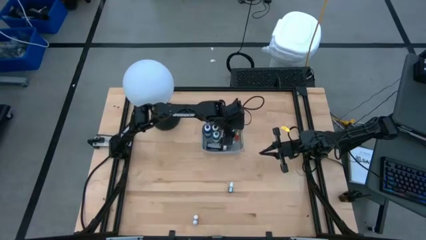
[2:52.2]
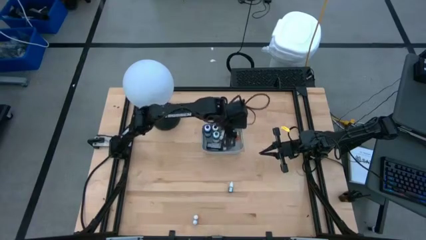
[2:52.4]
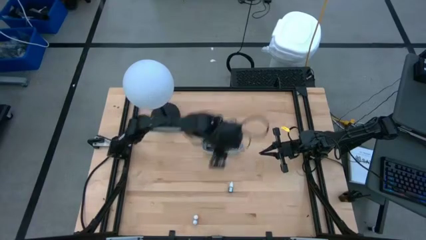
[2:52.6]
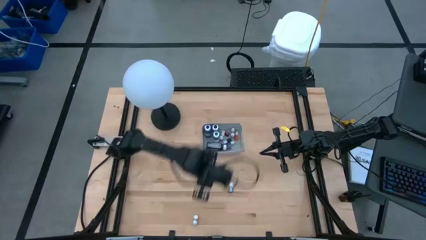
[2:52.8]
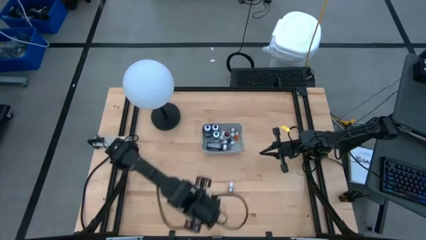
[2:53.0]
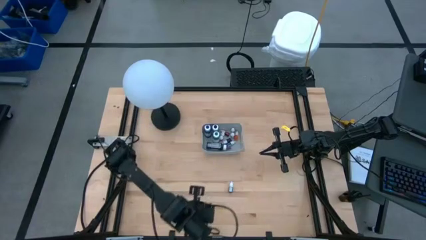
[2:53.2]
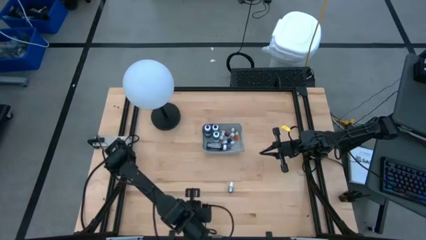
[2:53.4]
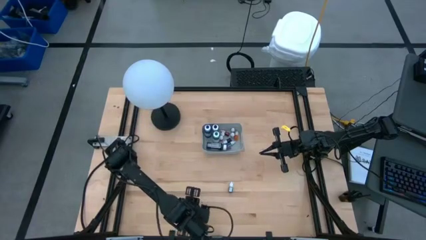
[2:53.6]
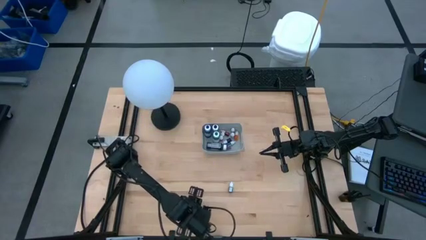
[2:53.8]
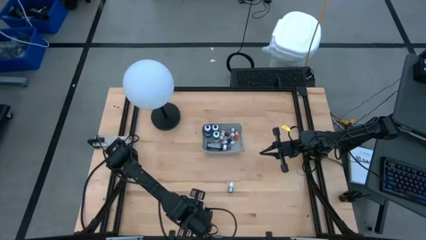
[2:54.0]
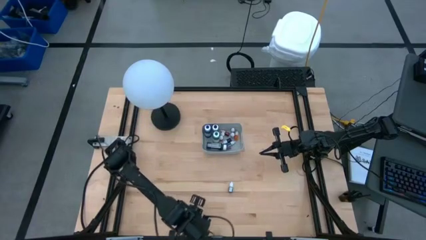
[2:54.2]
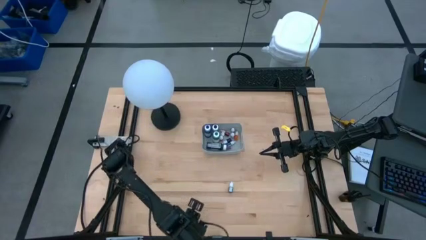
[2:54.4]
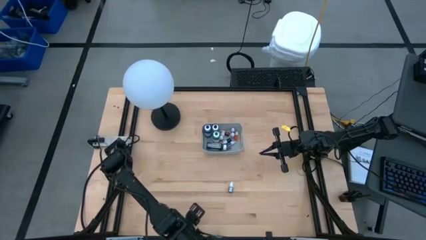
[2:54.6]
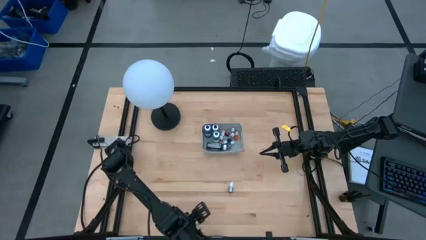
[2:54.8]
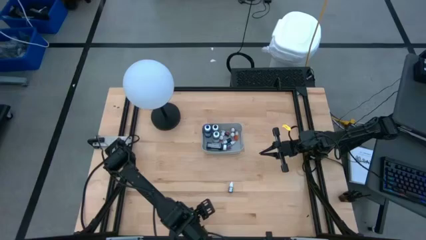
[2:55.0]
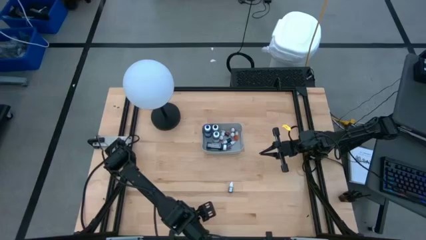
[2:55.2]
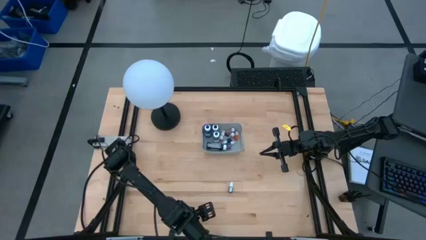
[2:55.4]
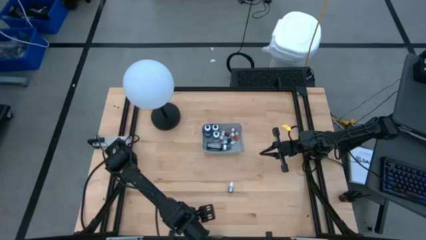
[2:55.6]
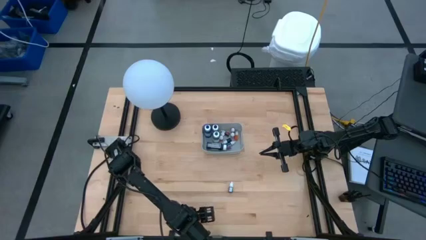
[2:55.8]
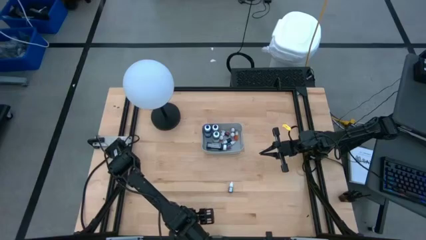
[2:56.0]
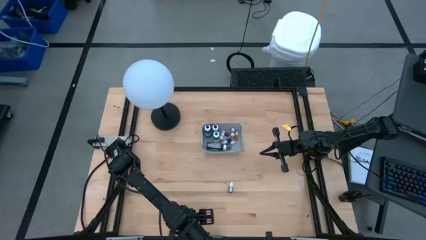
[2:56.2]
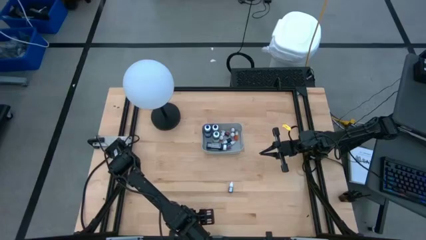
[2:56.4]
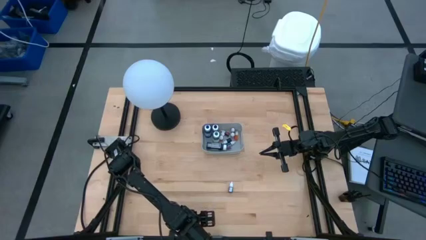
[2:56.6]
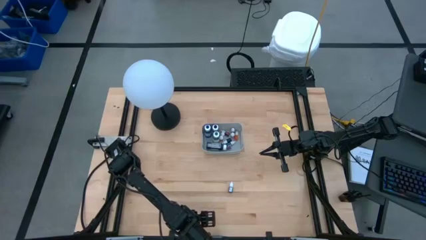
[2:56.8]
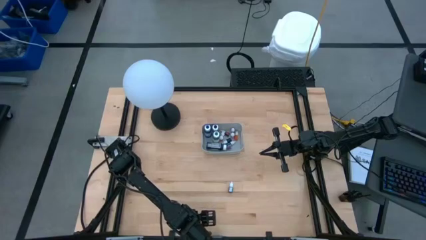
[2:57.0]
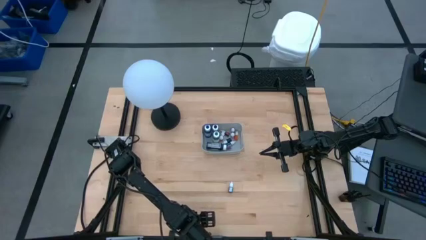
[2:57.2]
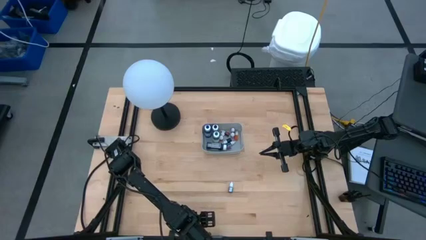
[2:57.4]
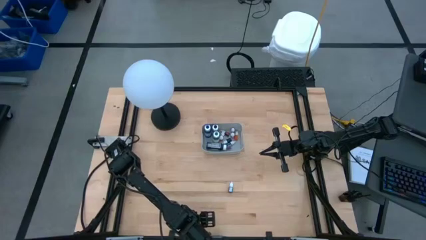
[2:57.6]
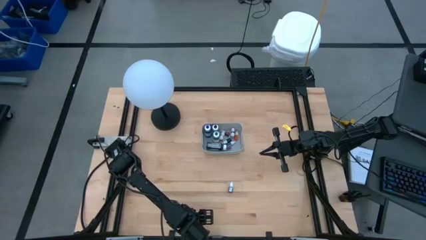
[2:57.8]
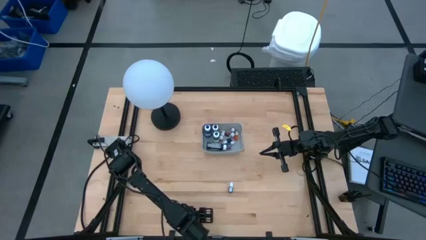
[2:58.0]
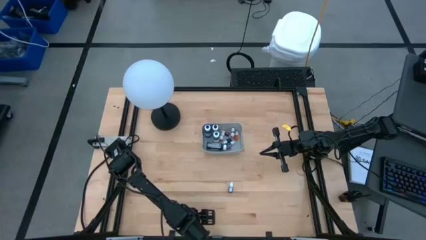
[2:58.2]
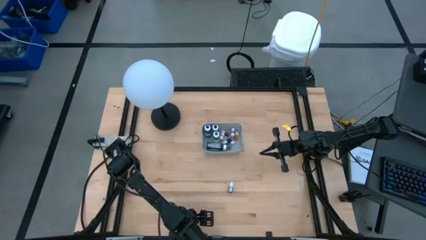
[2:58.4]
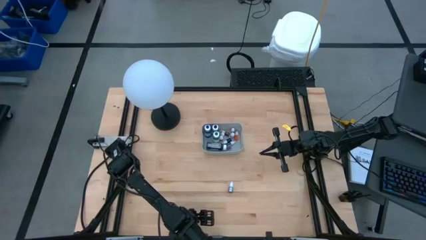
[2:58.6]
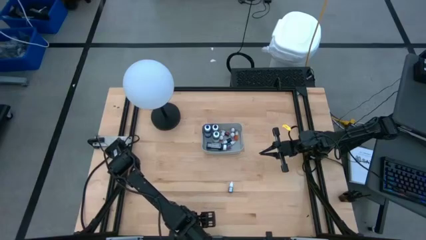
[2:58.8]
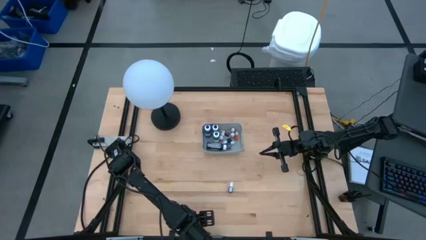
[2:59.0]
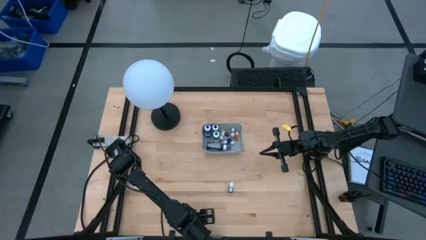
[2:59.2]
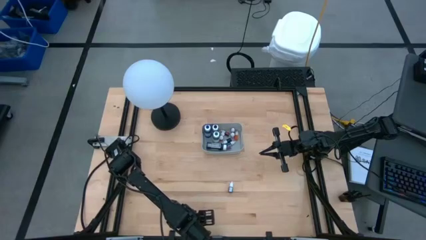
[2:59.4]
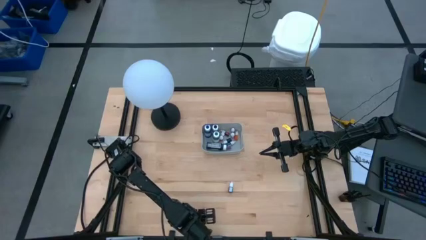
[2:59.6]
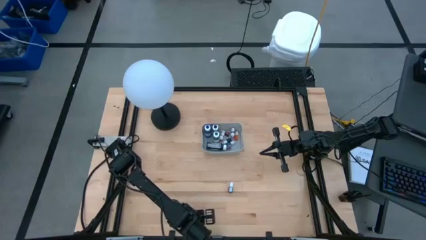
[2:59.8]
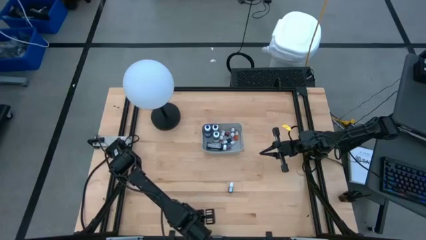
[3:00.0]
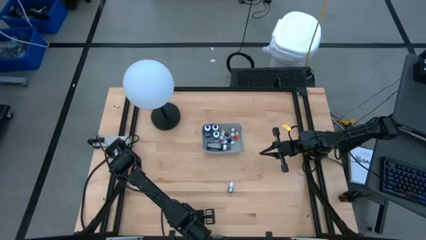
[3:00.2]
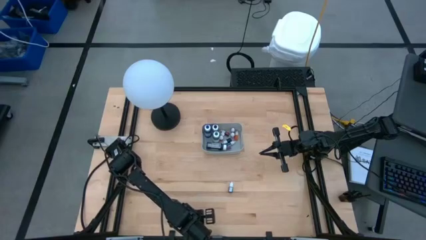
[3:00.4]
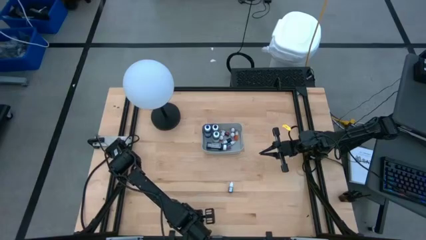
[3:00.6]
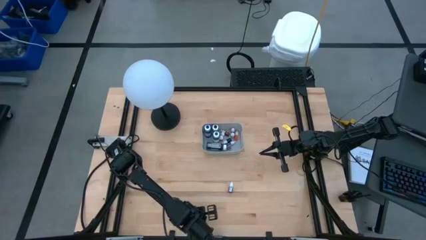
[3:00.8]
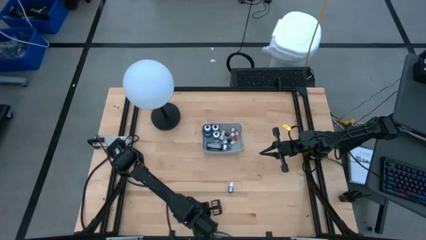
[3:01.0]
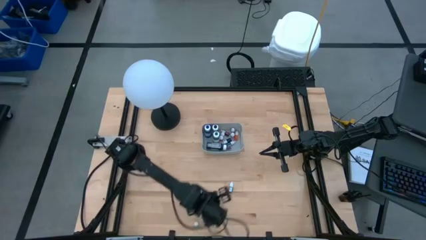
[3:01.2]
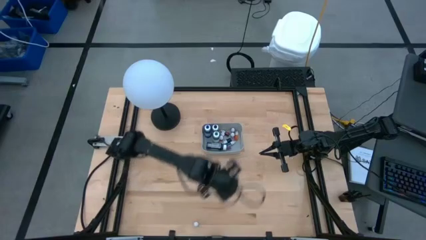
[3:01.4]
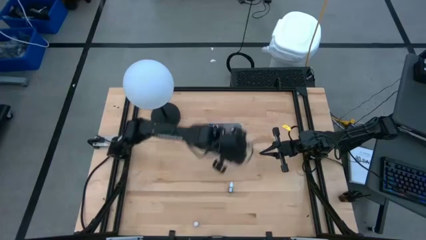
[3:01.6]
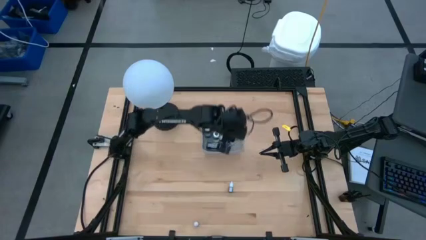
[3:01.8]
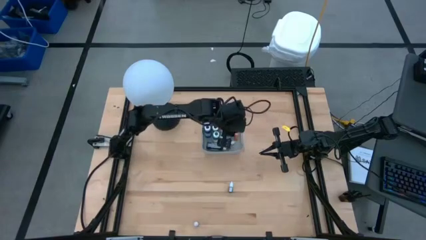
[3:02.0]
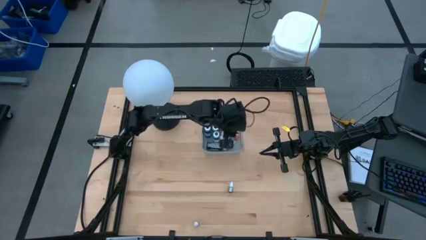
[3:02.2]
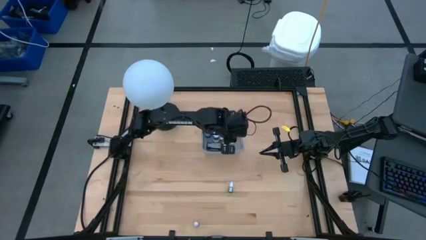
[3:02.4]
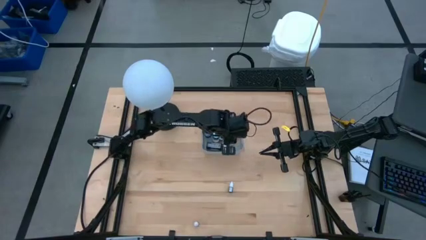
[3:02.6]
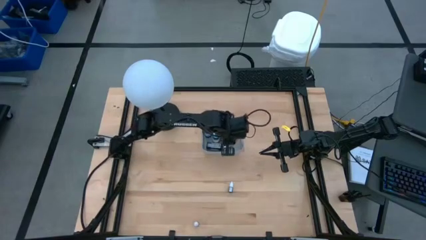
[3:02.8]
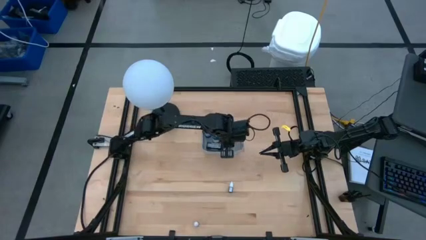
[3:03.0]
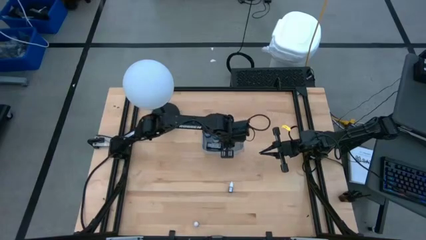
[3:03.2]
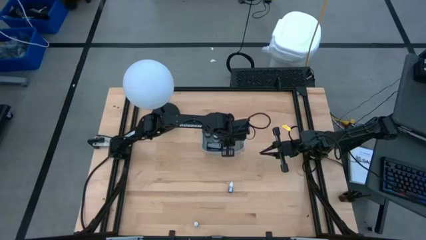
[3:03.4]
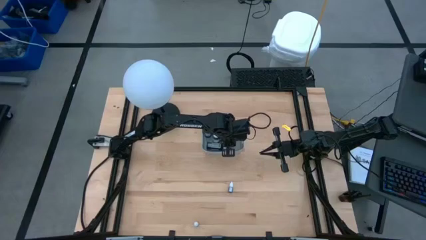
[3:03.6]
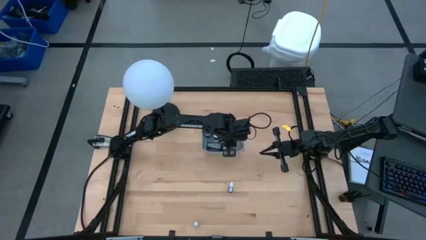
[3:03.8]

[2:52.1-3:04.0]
Task: Pick & Place food coloring
Put the small yellow food coloring bottle into the gray bin

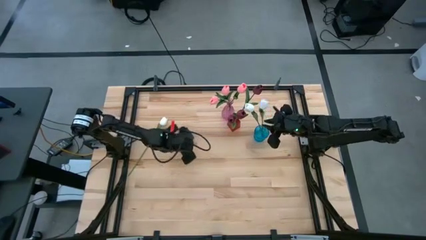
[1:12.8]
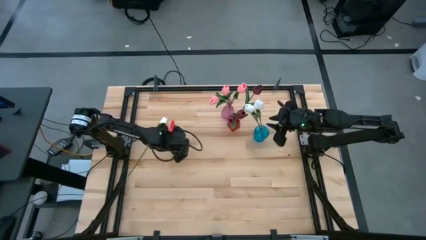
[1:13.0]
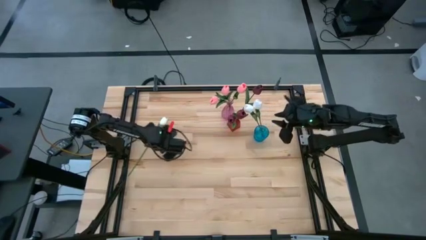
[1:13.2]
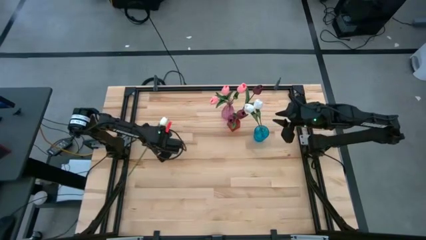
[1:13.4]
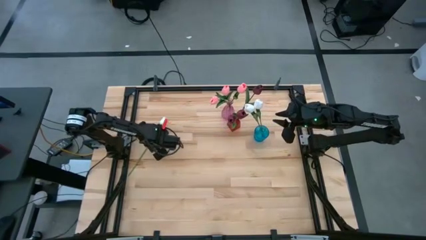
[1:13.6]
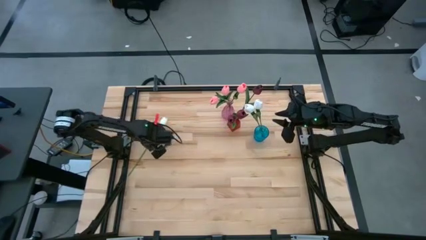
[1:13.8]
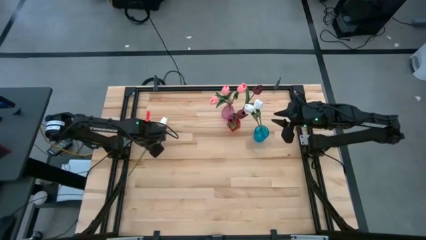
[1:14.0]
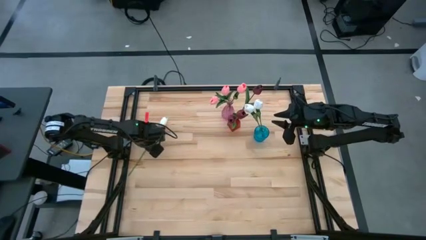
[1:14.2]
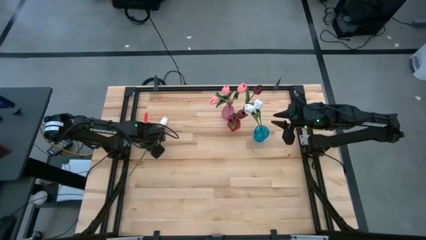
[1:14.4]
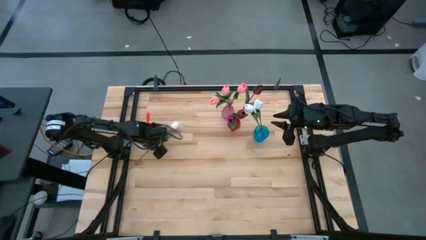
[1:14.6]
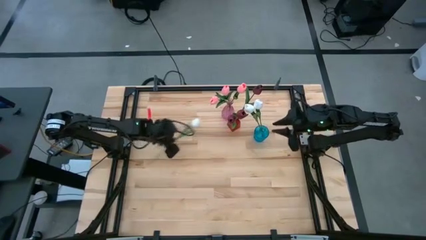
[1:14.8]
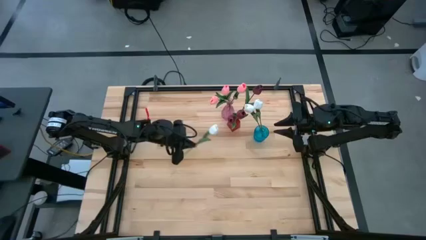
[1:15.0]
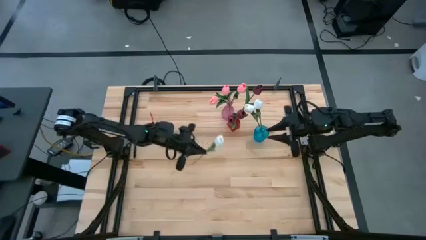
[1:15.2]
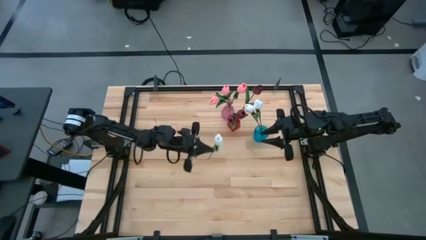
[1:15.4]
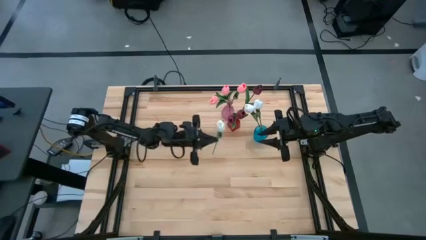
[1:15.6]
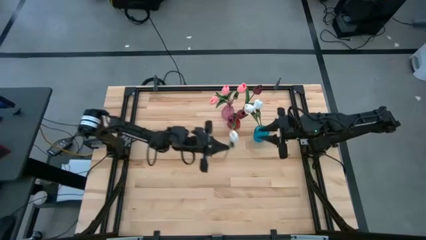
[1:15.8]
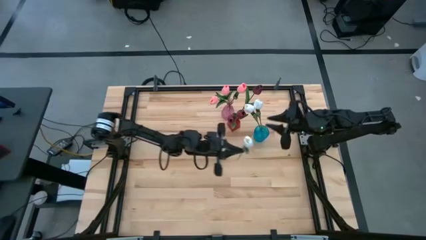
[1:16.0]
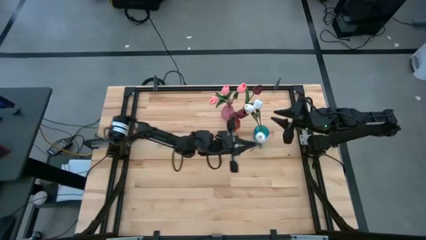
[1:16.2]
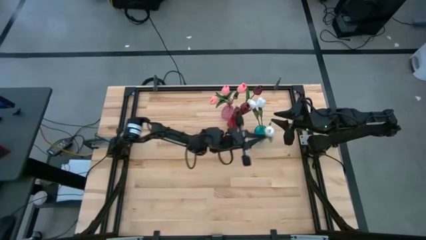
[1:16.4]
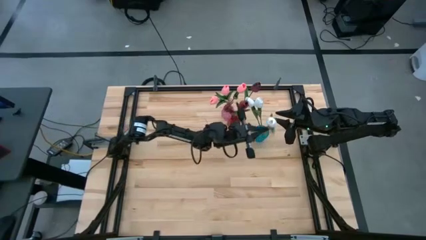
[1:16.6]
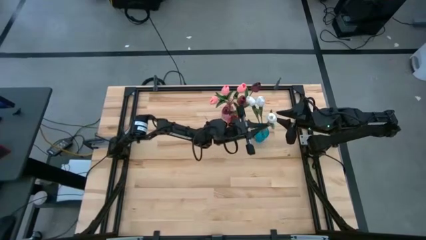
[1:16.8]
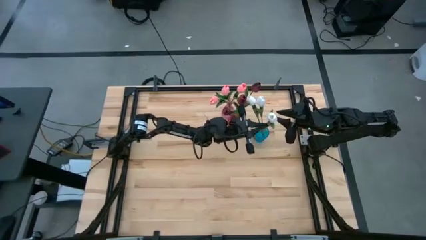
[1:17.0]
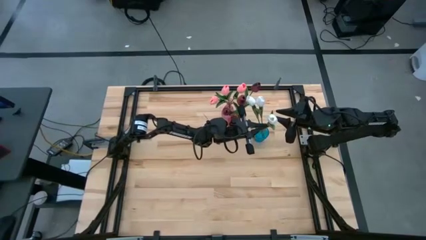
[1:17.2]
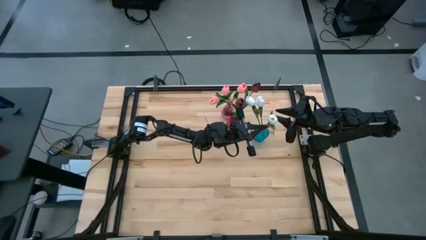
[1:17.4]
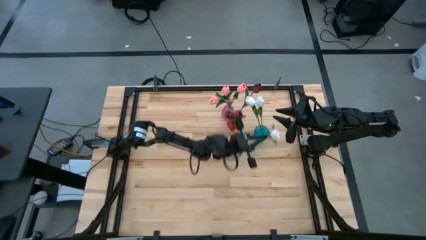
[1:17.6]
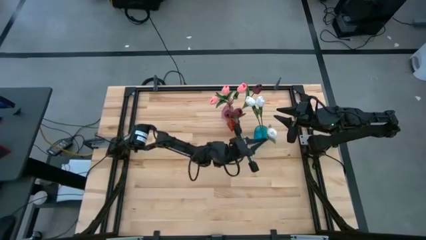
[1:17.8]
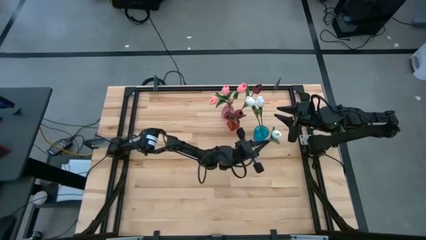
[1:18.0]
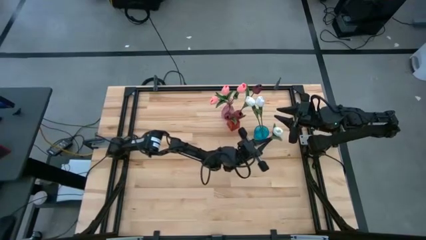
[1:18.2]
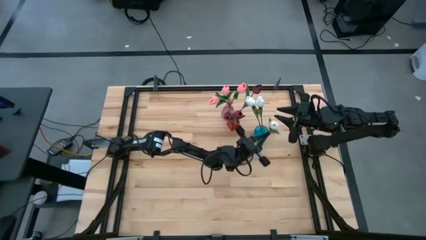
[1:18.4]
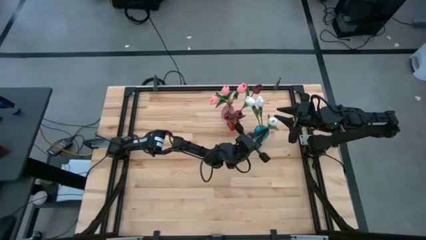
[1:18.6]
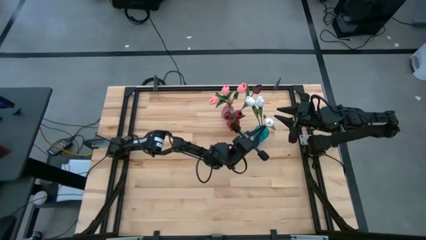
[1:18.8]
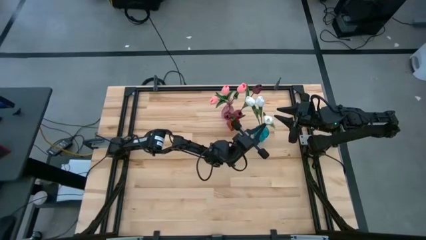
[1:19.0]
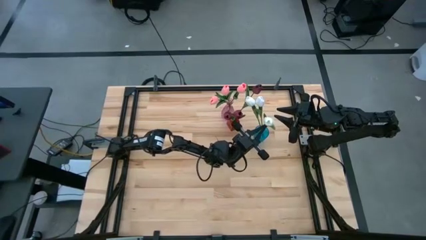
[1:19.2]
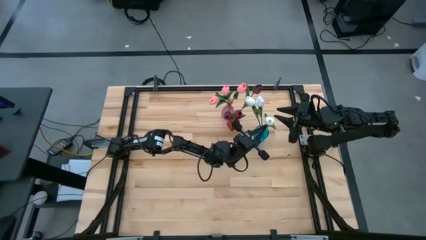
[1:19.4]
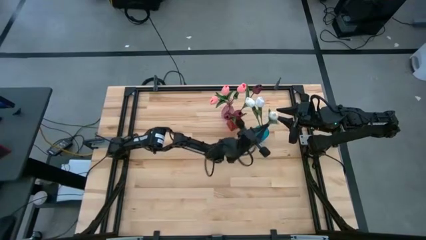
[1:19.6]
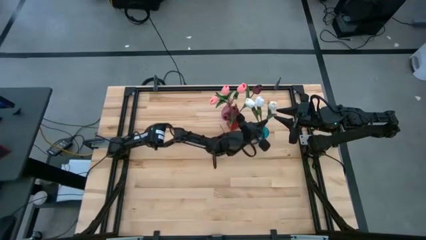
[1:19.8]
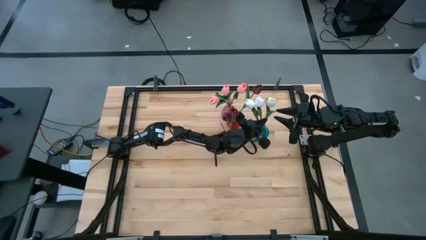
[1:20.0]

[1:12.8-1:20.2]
Task: Sort flowers into vase by color
Put the white flower into the blue vase
